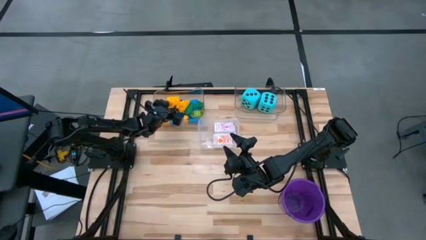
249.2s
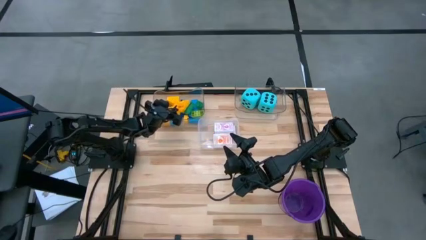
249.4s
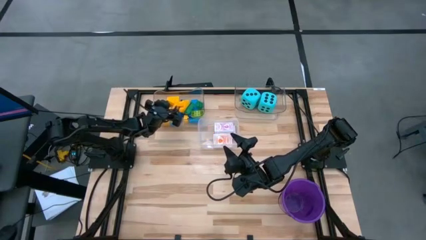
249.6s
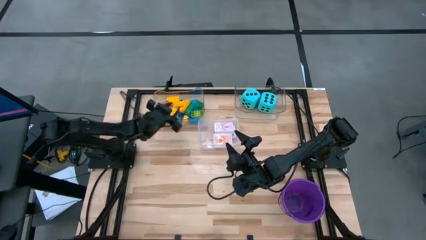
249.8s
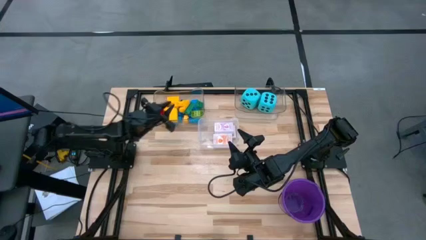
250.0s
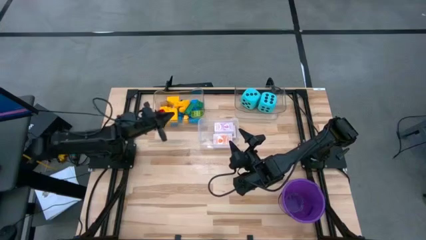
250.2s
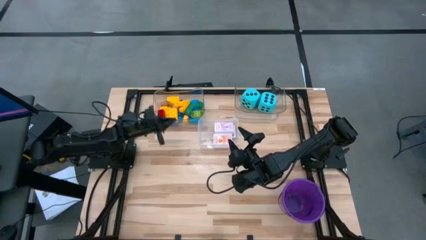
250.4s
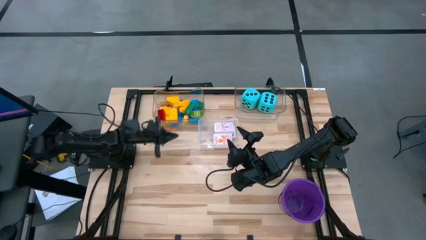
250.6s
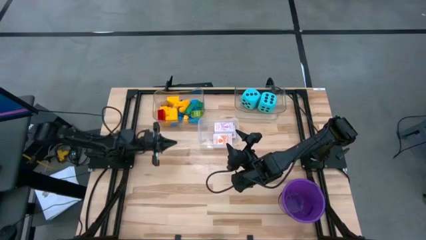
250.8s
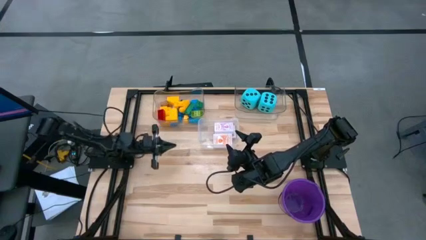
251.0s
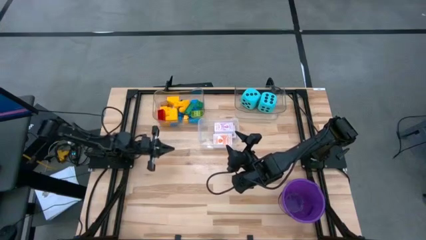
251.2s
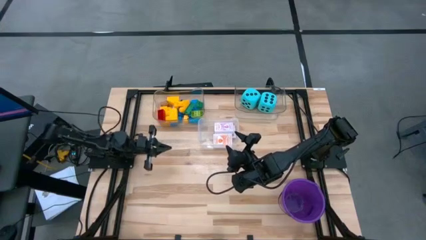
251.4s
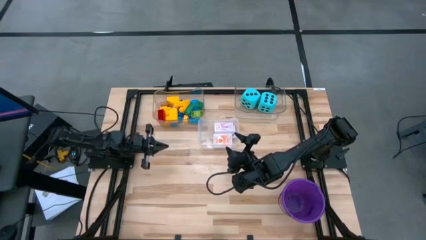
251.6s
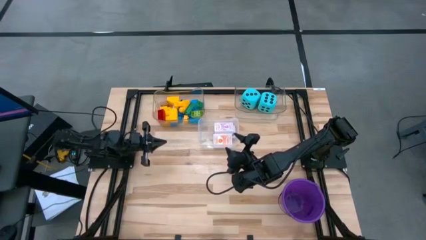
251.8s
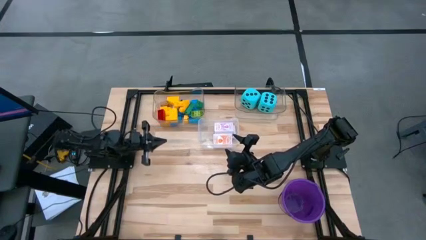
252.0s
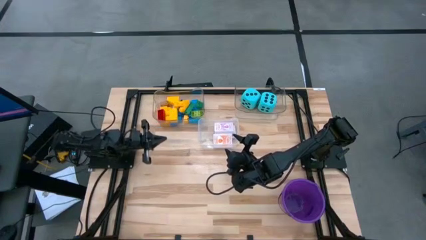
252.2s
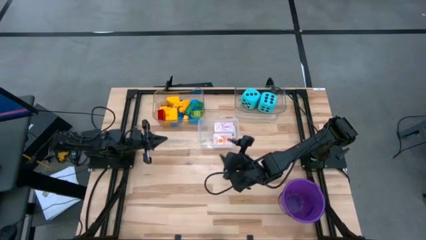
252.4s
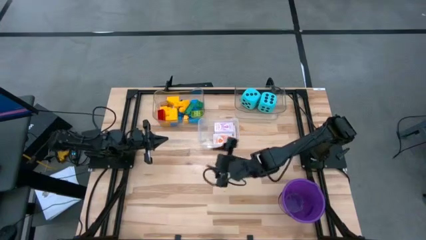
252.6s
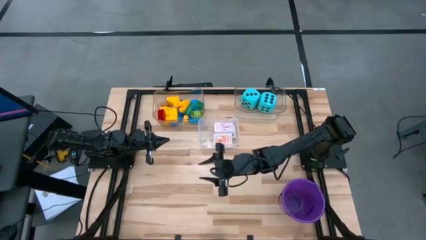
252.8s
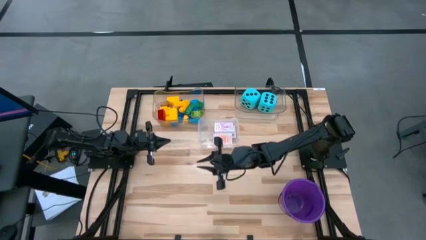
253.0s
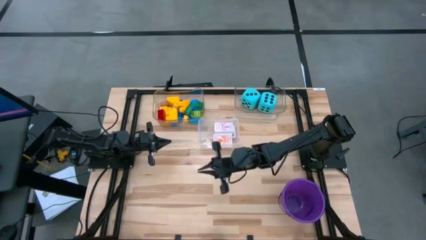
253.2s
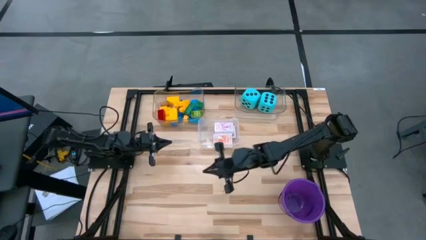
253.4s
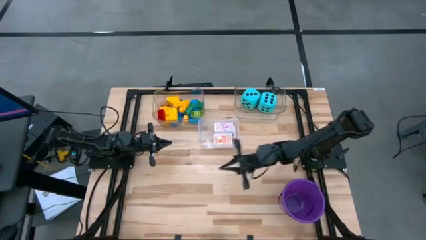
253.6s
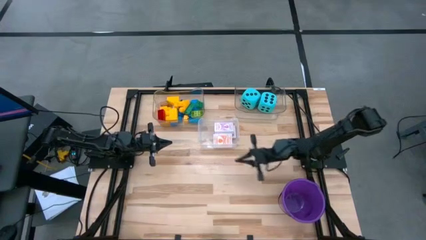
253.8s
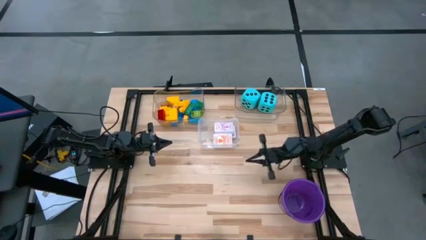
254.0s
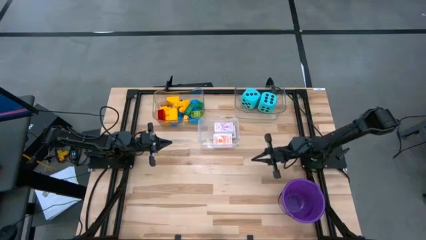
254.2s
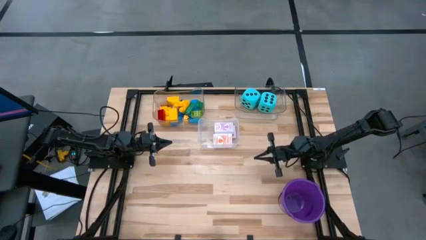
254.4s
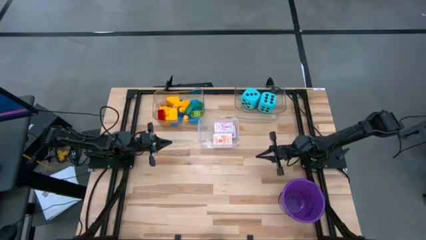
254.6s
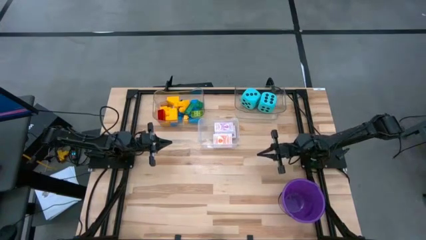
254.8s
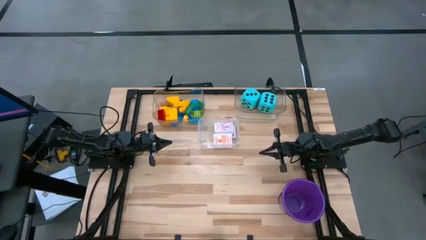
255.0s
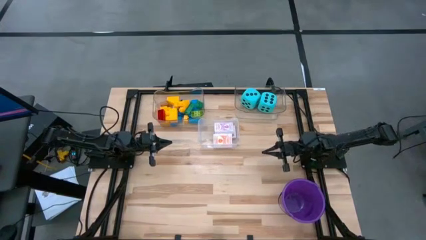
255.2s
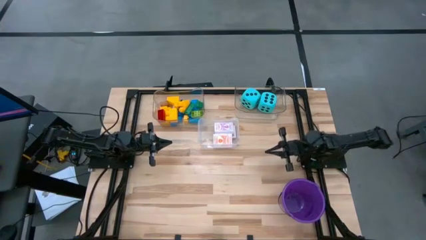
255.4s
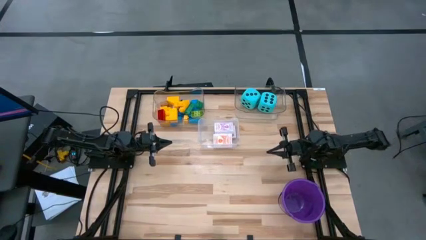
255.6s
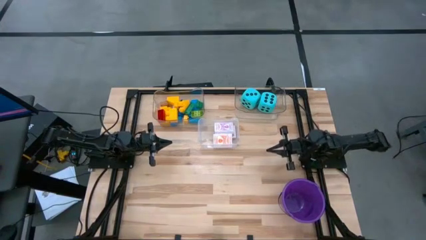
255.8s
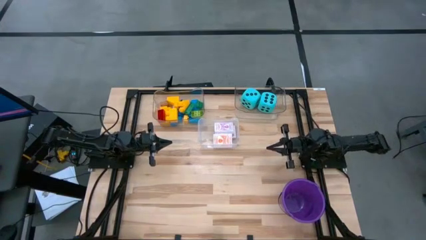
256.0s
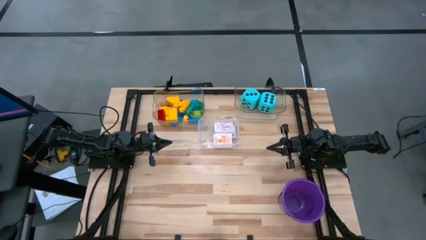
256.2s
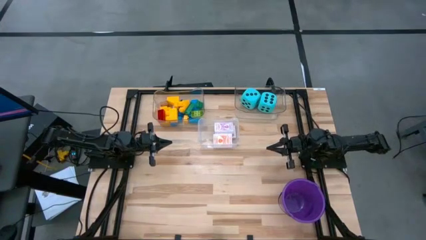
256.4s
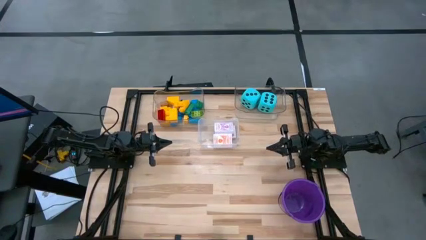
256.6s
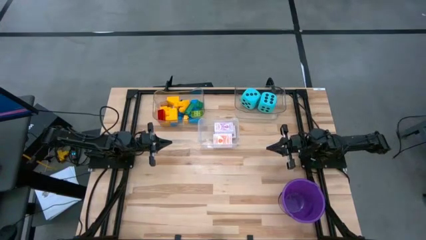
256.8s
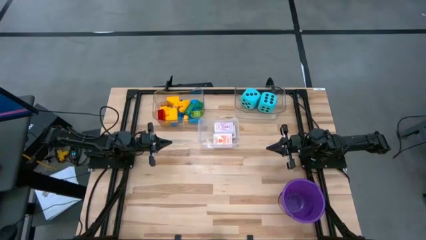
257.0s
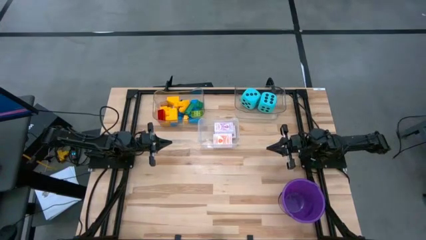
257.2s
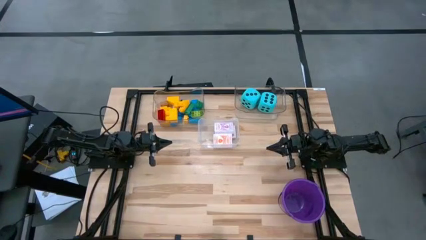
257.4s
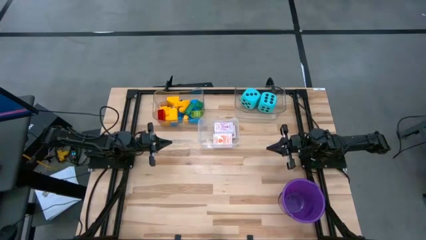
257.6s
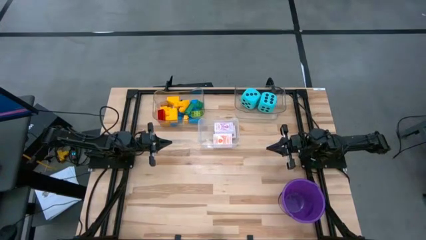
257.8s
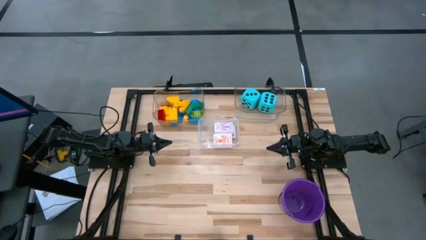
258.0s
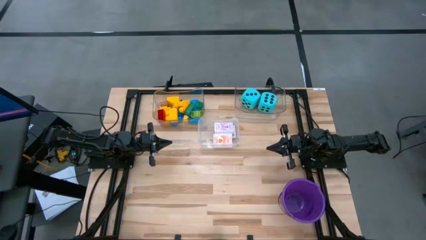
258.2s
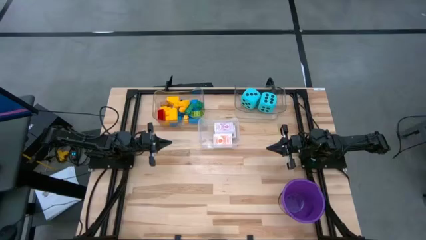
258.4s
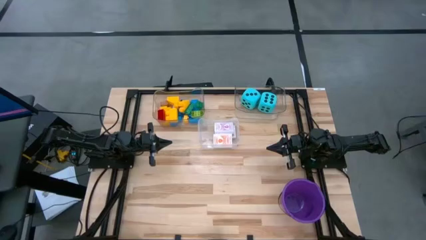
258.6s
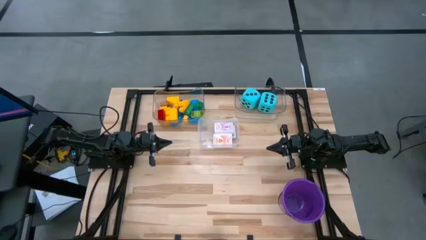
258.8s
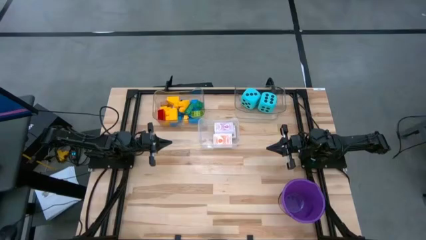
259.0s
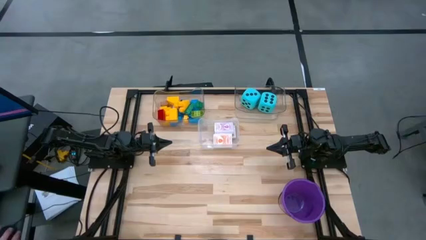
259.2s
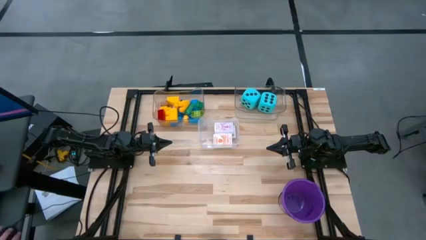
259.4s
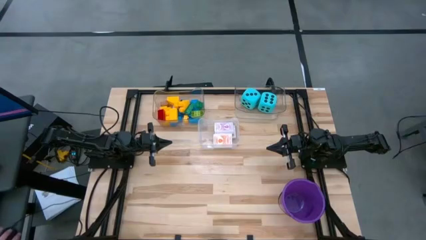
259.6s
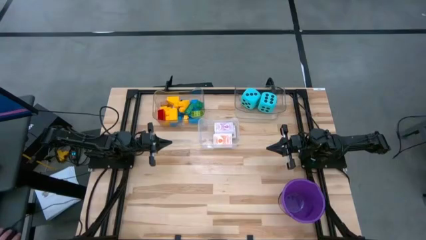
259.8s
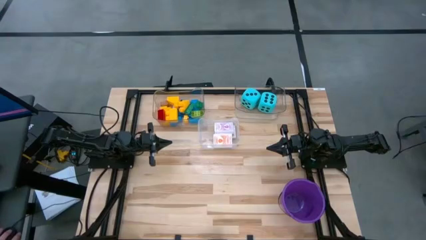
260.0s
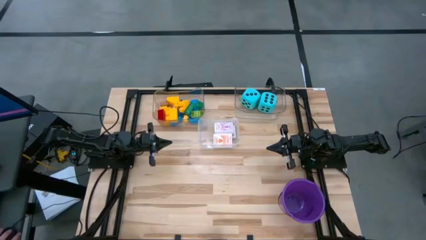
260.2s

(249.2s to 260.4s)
Task: Pick & Place Toys
Return to Home Position

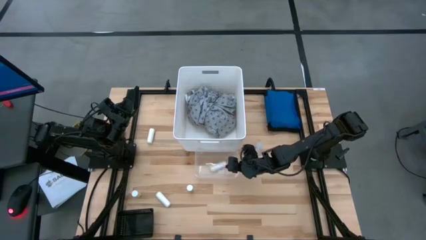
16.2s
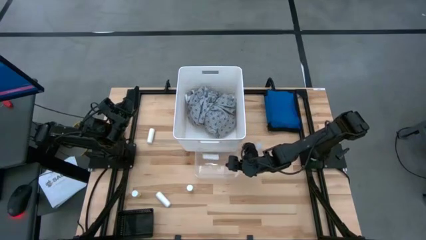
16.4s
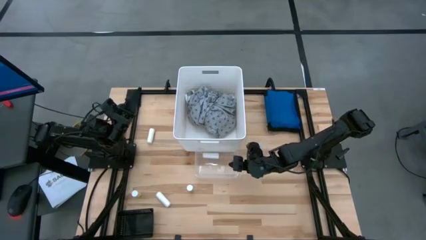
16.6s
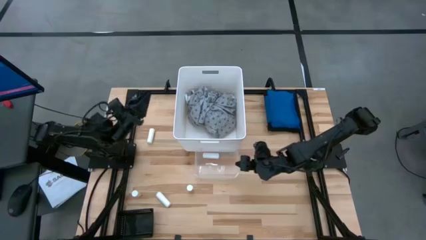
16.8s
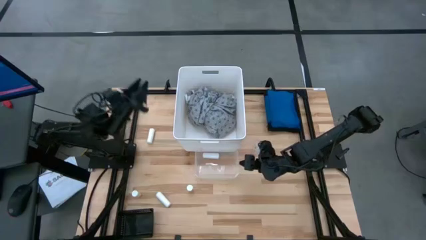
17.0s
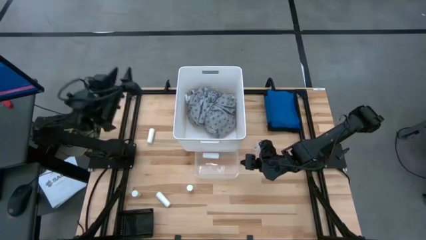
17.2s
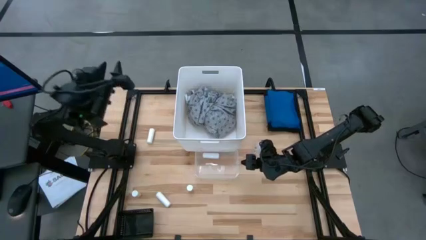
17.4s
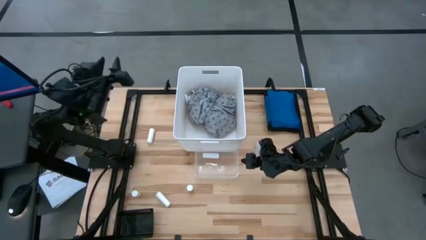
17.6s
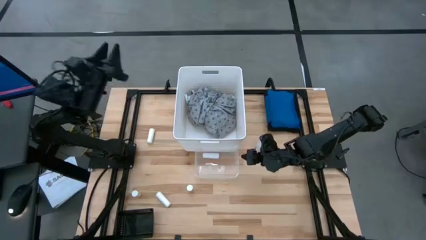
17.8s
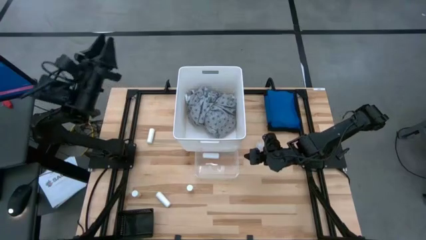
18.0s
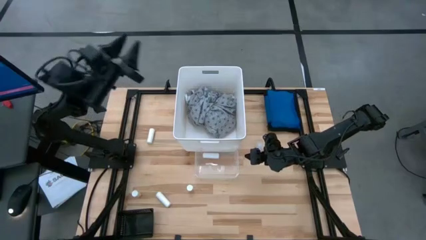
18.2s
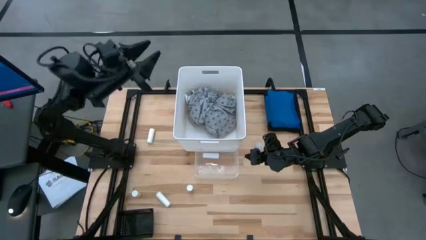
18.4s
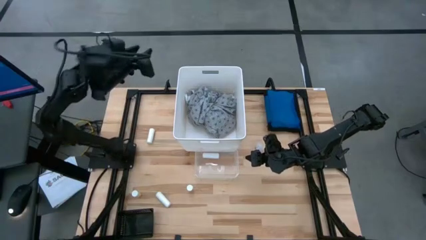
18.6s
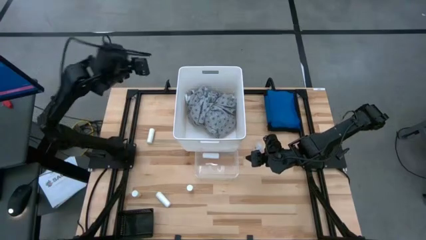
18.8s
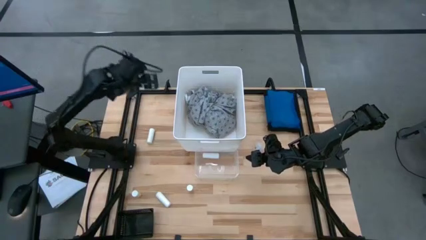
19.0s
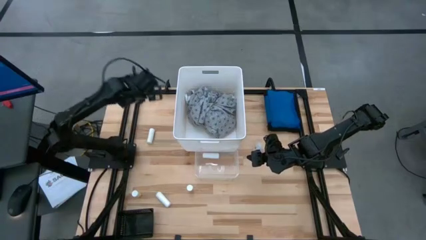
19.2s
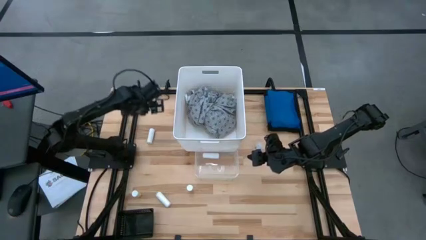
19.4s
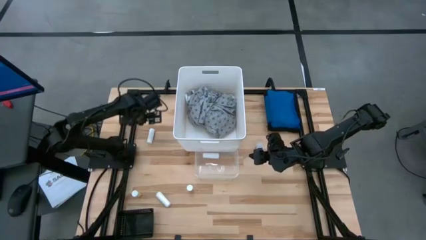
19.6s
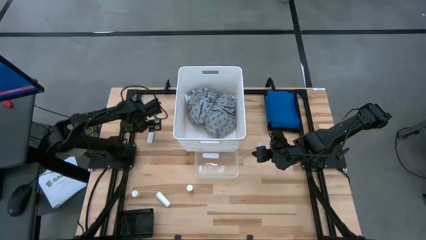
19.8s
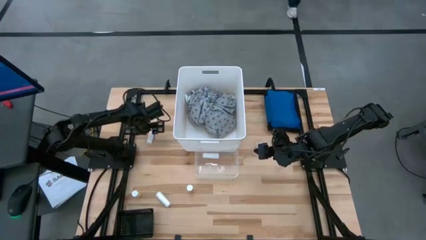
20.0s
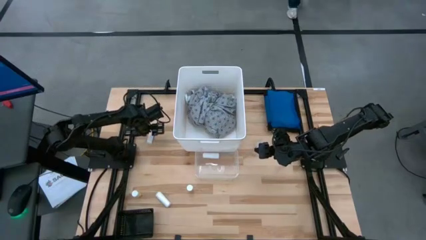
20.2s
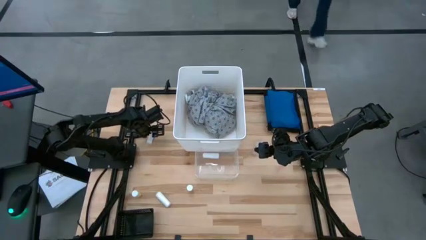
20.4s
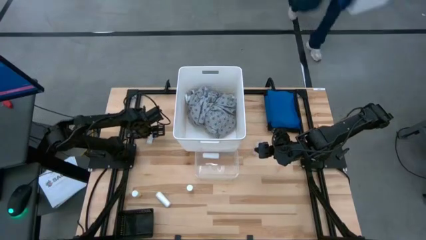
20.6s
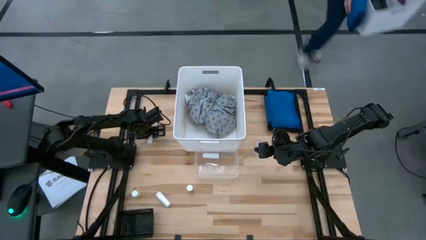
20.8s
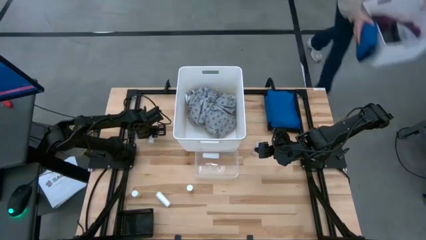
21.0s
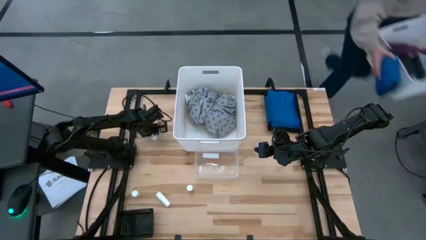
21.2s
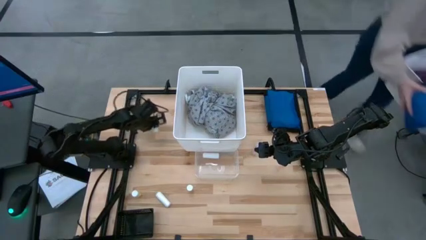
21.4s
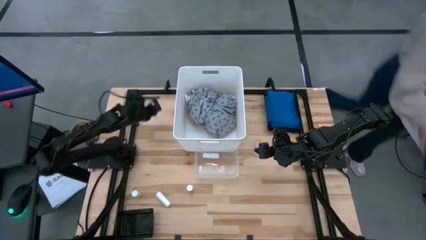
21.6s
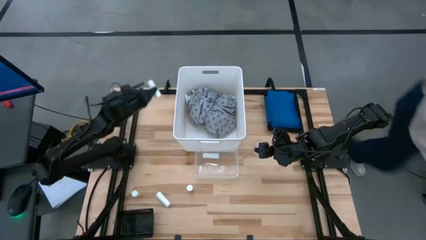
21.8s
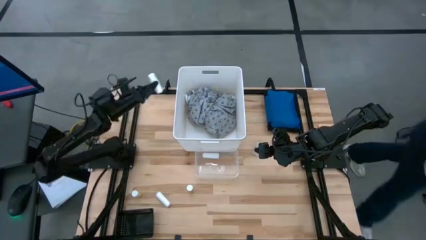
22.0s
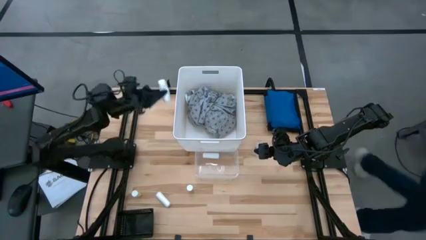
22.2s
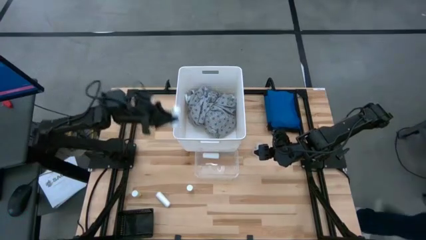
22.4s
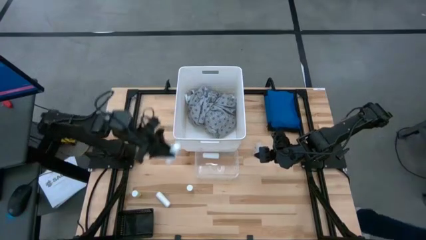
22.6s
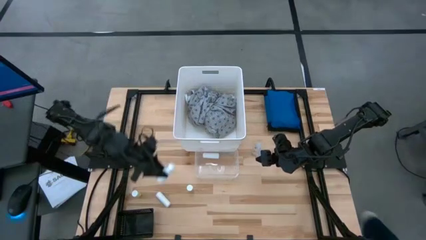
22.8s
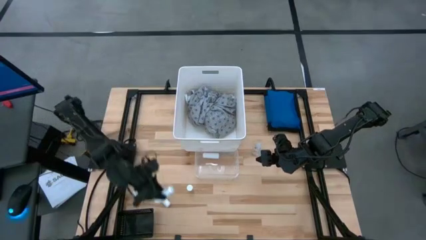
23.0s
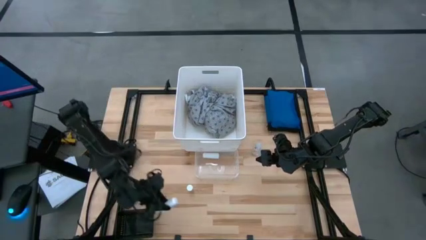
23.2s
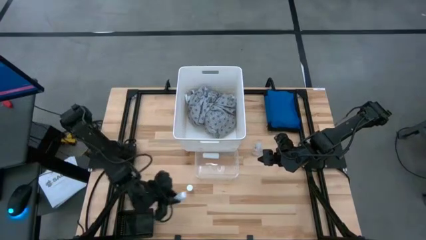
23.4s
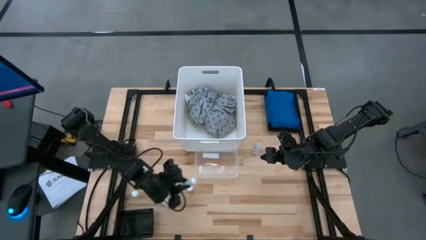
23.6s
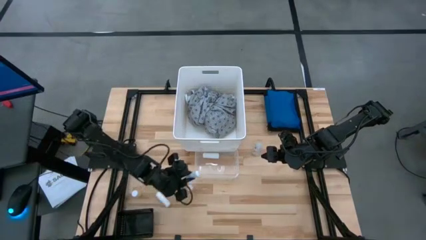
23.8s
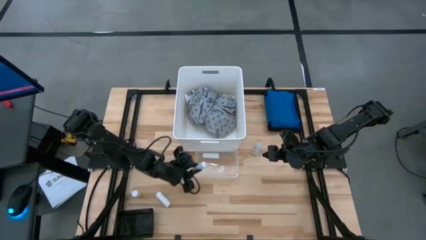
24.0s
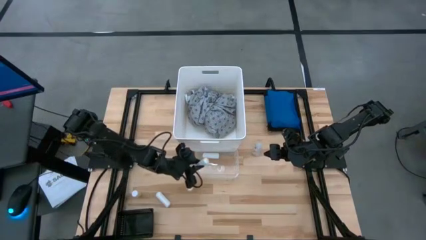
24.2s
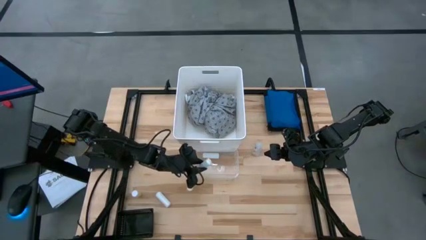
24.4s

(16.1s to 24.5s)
Task: Pick & Place Medicine items
Put the top rolled gauze into the transparent bin
